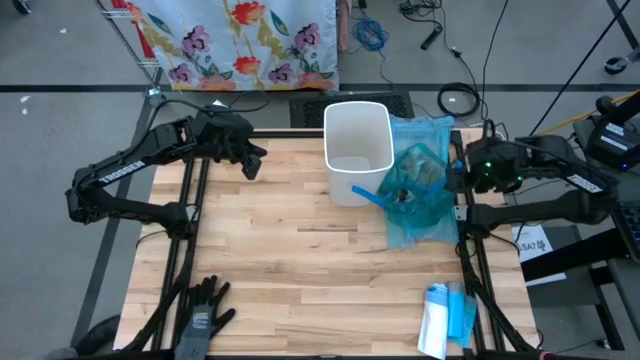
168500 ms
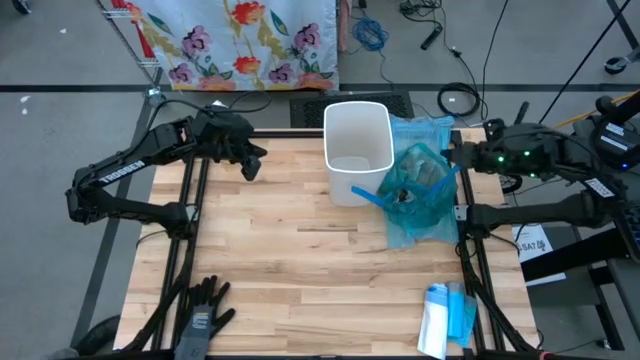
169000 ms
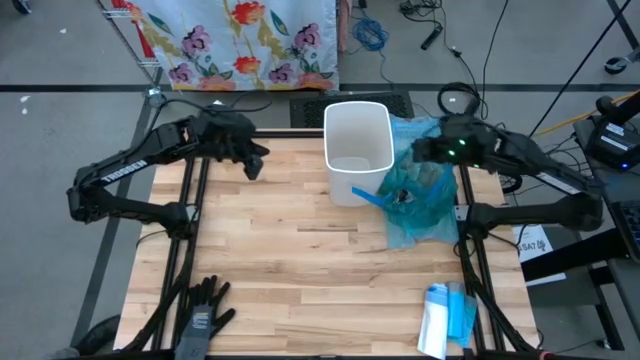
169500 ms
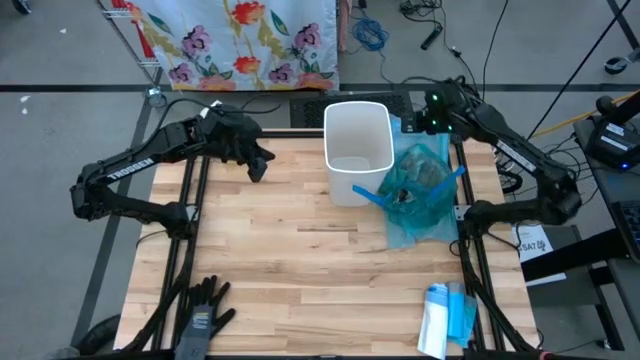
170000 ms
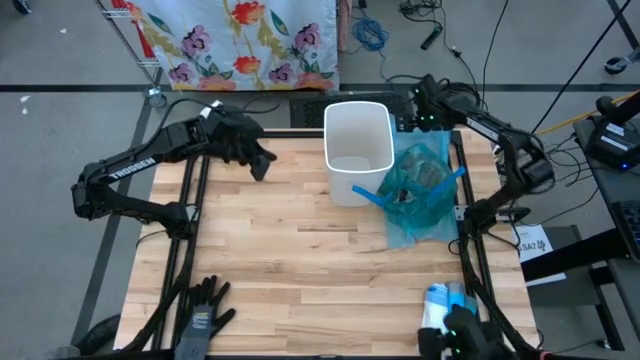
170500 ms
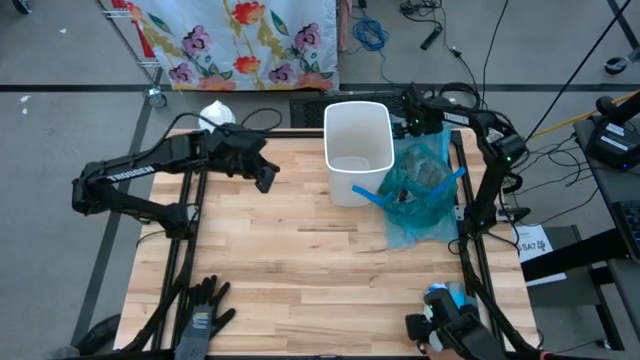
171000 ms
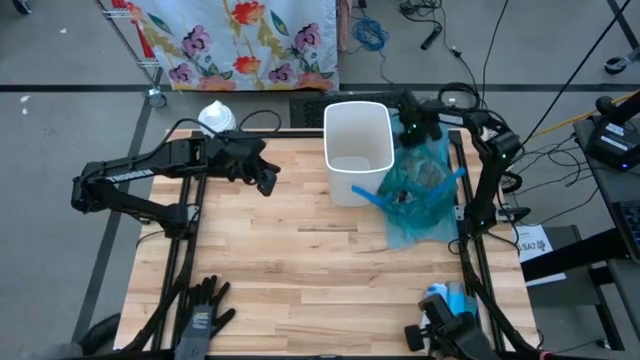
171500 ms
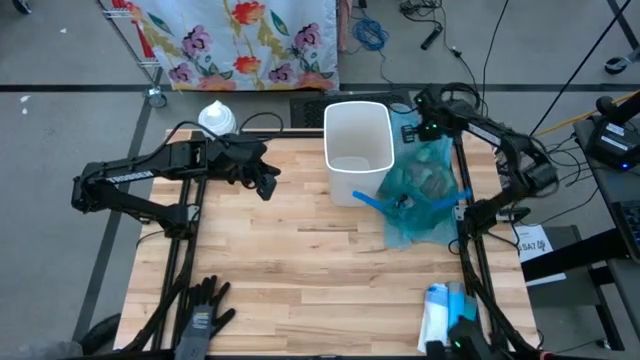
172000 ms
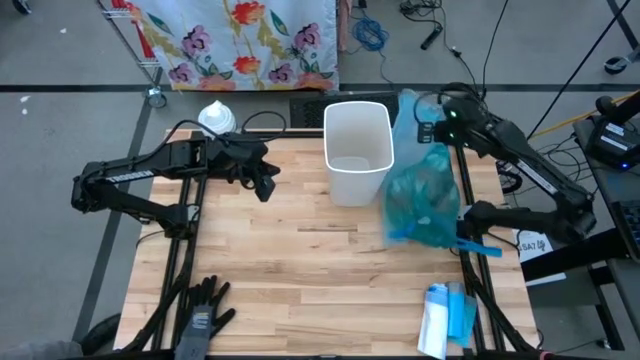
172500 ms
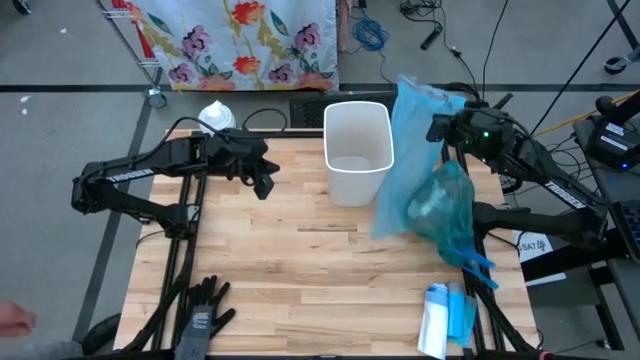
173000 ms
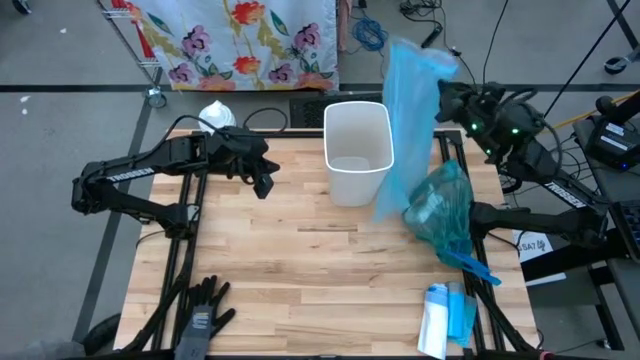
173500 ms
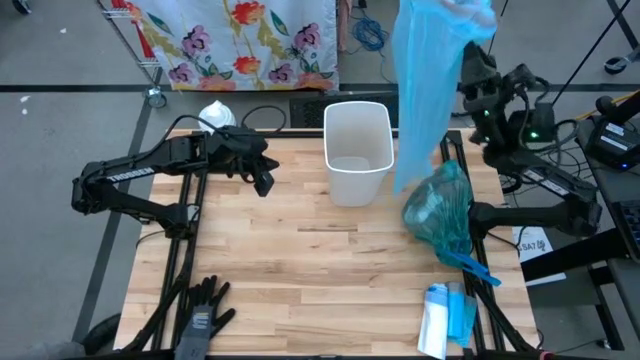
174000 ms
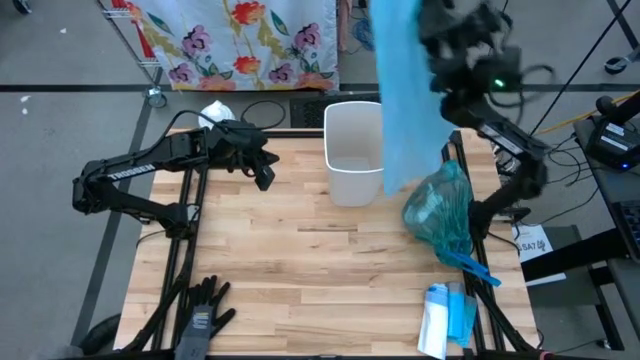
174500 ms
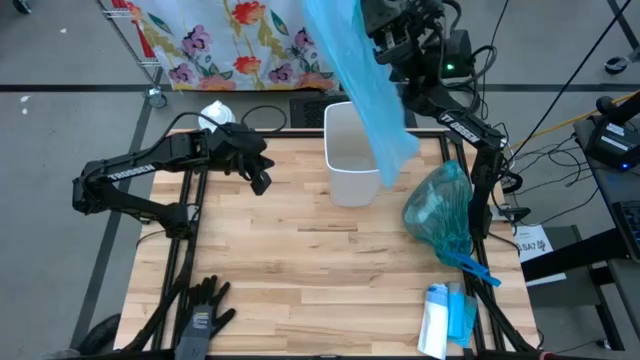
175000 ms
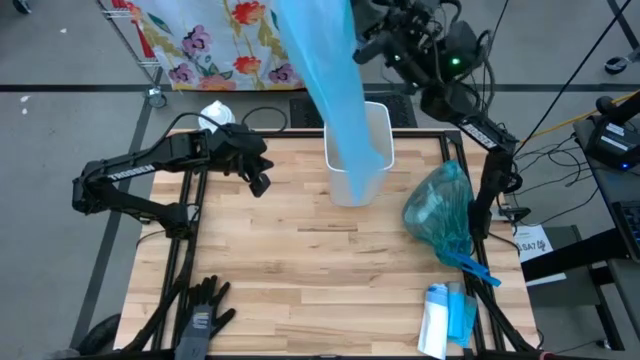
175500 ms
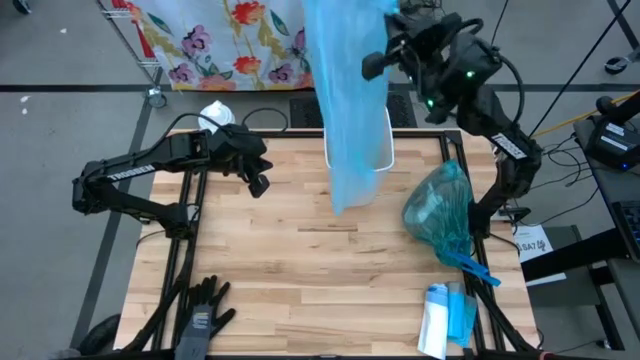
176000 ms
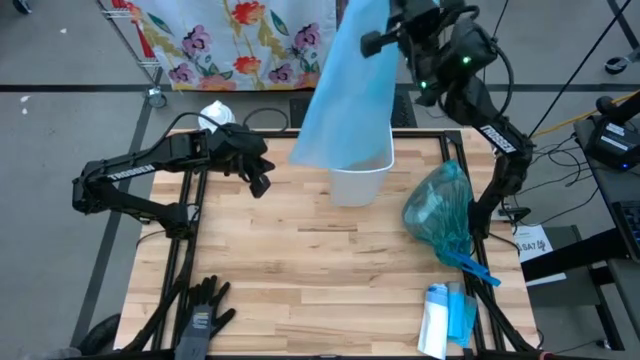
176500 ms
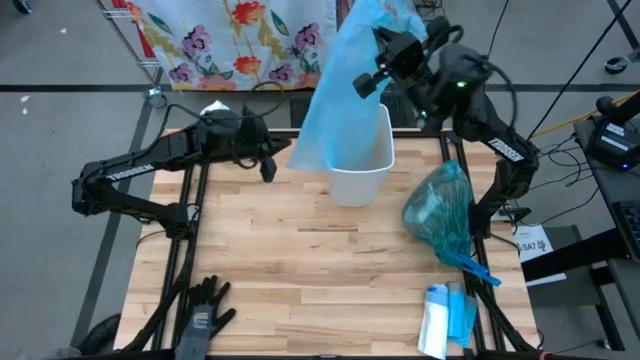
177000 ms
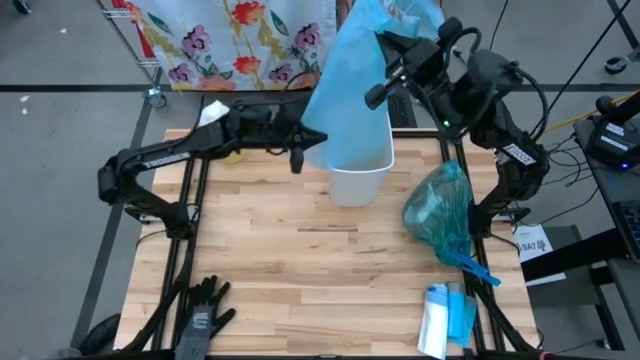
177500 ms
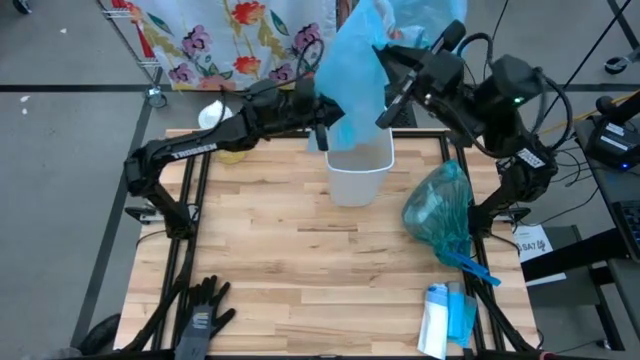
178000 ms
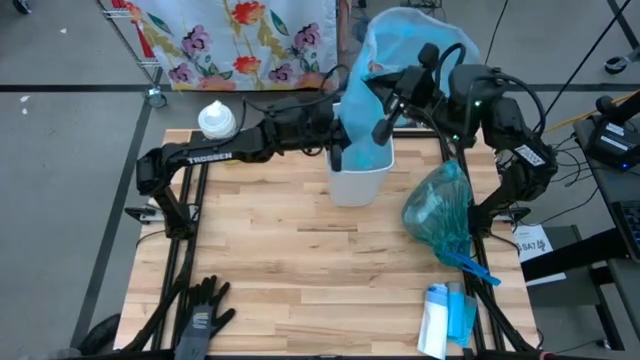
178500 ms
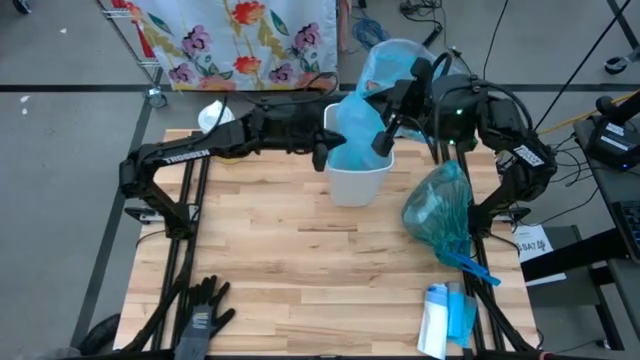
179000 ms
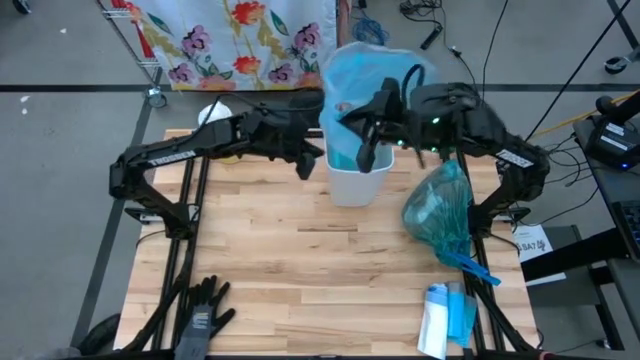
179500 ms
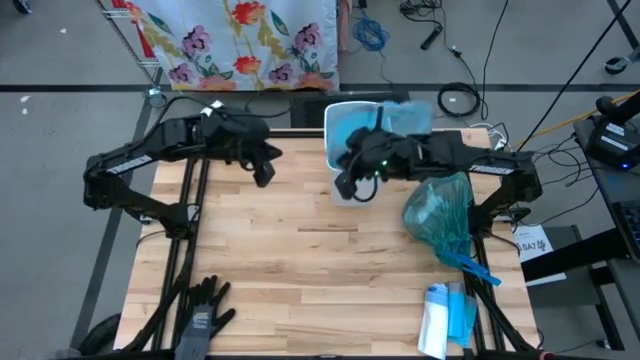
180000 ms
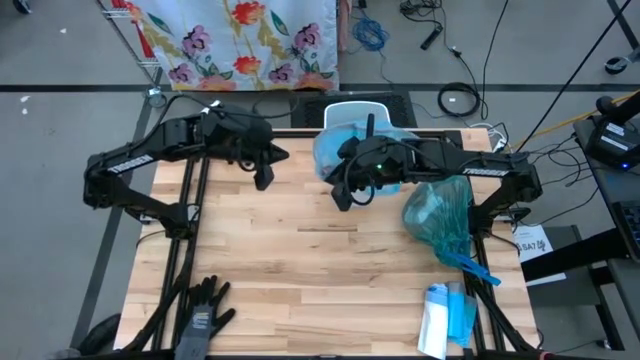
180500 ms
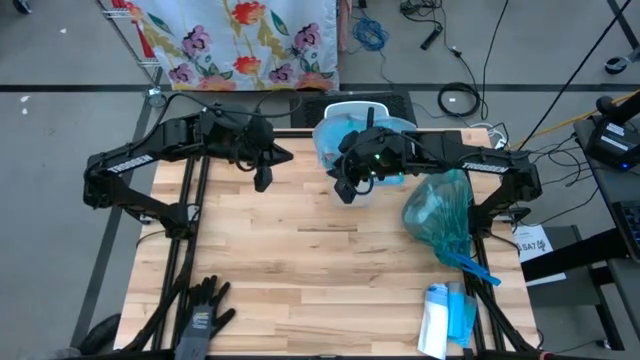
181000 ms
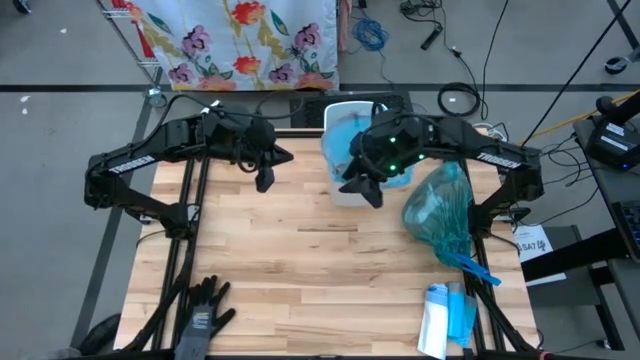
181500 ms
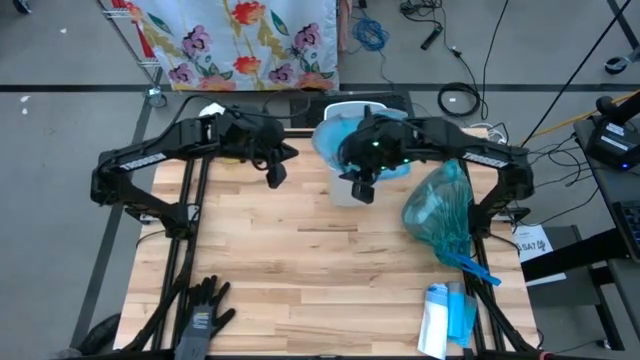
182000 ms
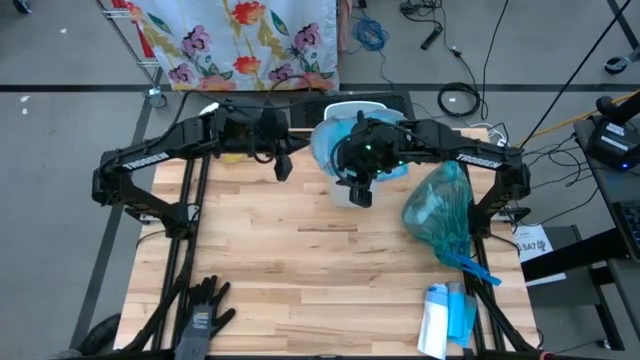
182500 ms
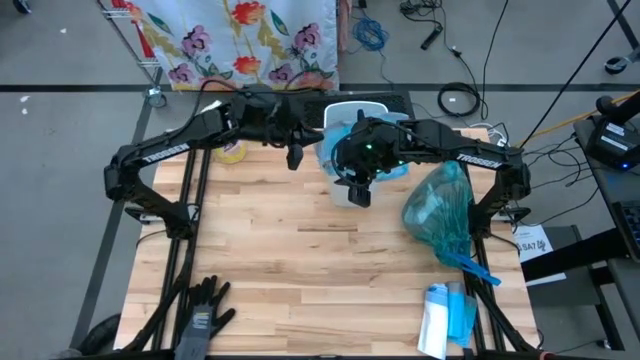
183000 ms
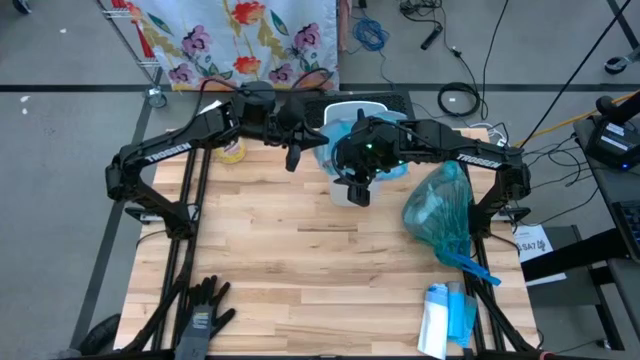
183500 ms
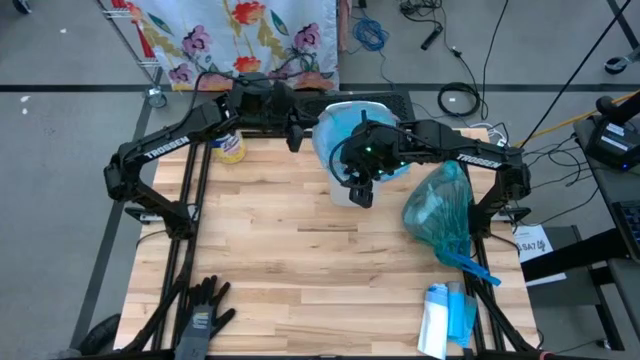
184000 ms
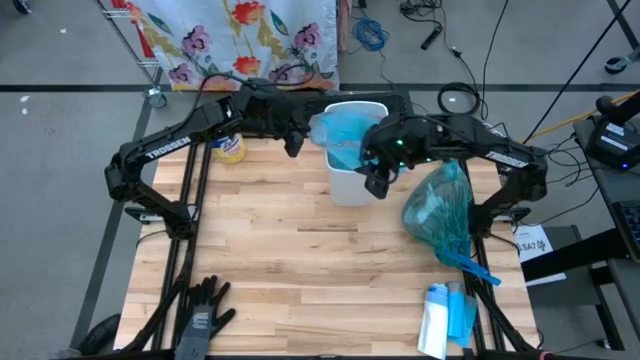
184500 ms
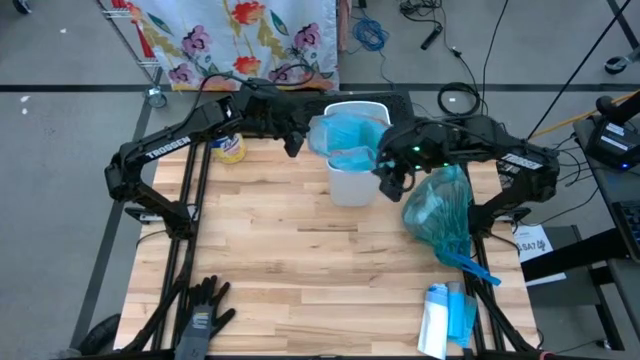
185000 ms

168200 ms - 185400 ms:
Task: place trash/remove bag and relplace
Insert a new trash bag into the trash bin

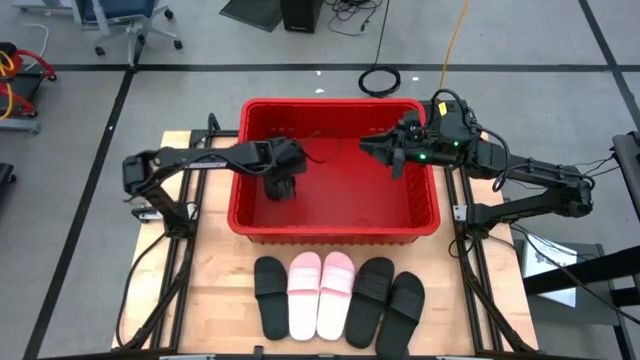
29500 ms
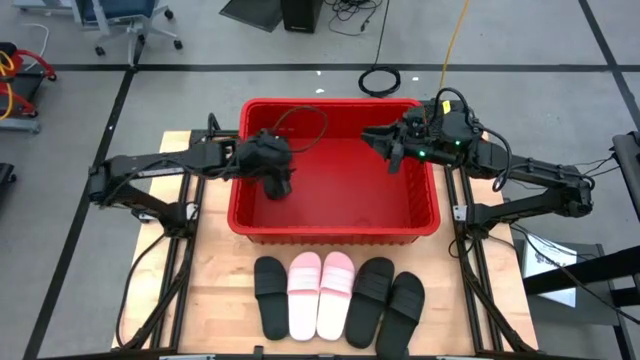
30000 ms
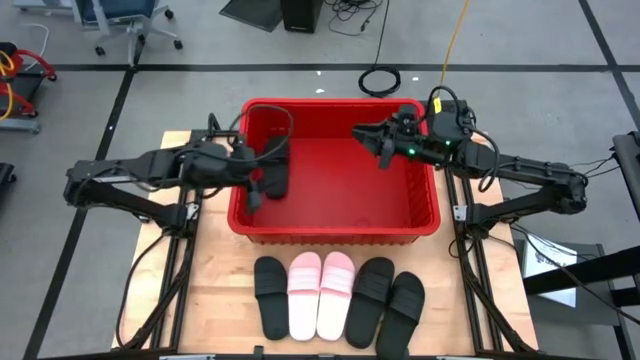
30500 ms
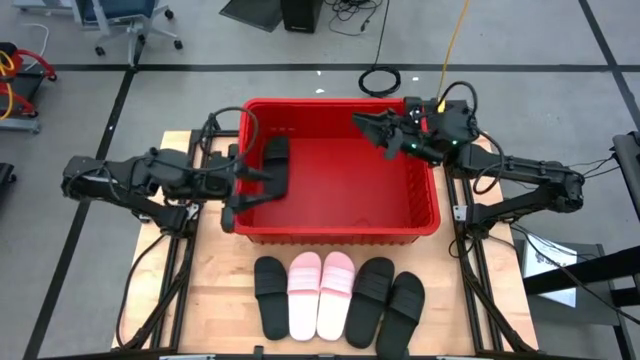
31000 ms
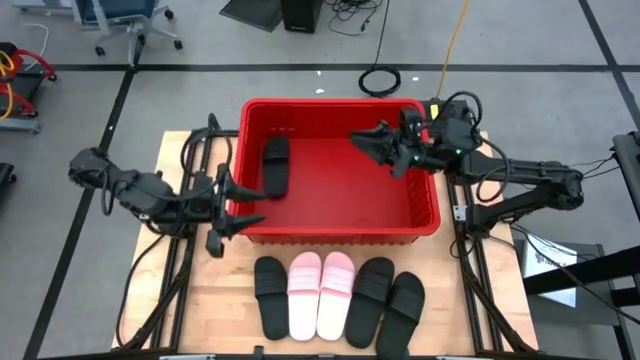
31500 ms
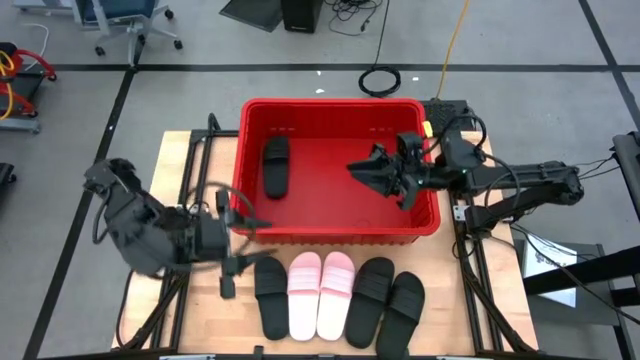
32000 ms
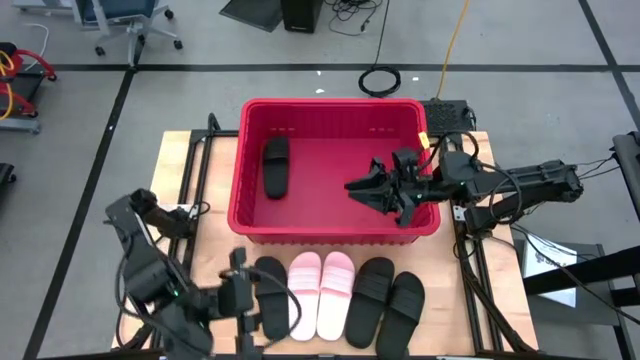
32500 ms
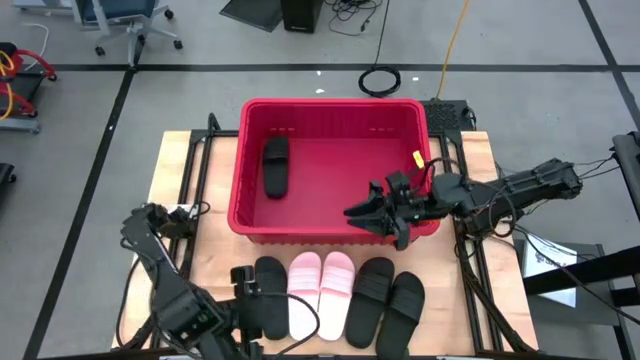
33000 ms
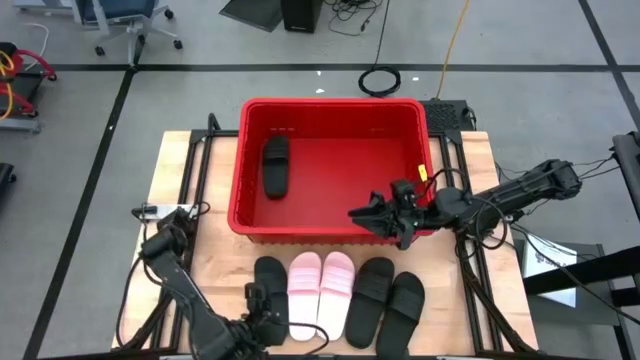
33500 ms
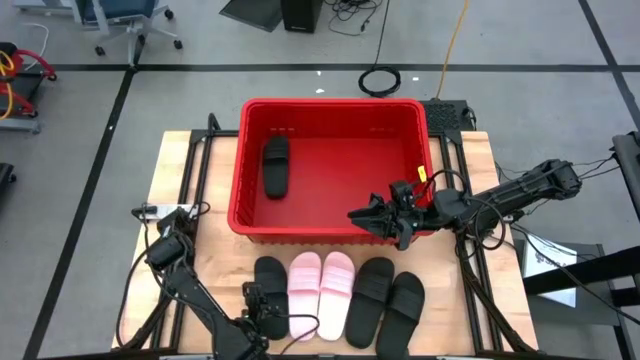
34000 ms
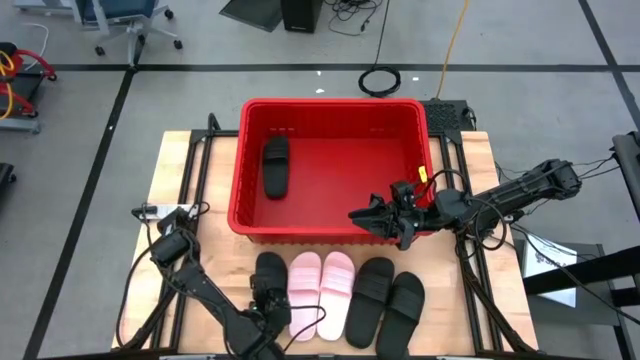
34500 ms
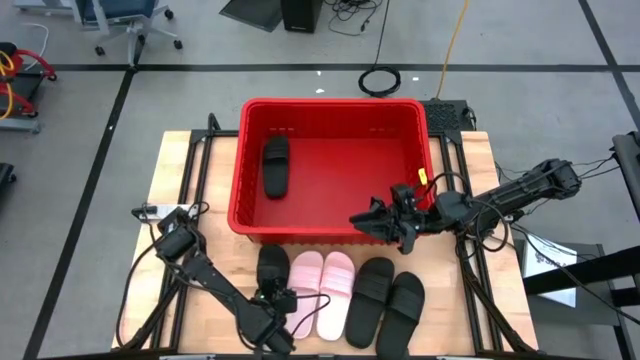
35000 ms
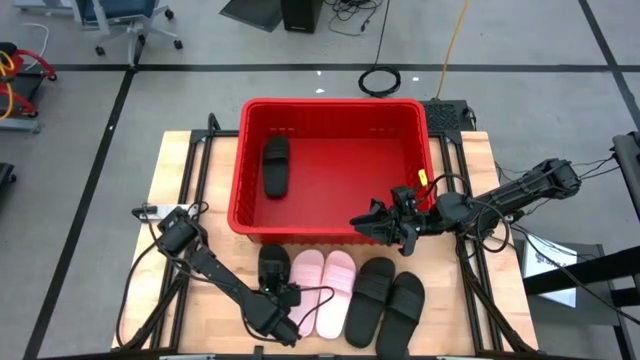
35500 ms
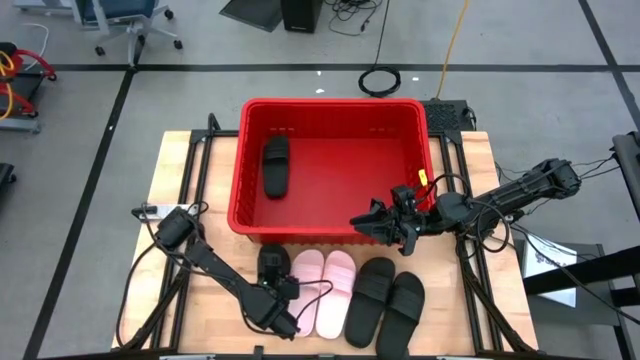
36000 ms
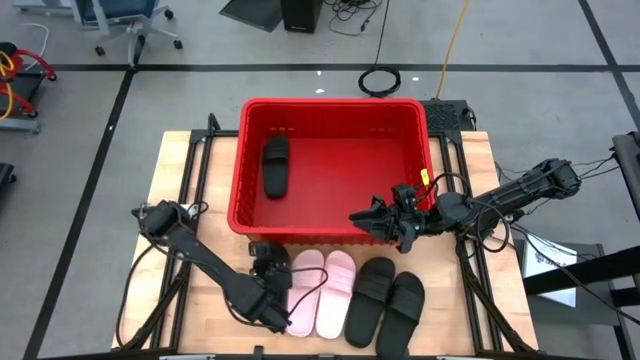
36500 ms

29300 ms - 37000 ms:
Task: Pick and place slides into bin
Put the black slide into the red bin
